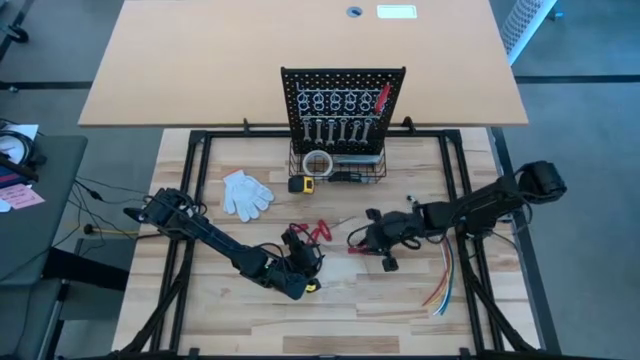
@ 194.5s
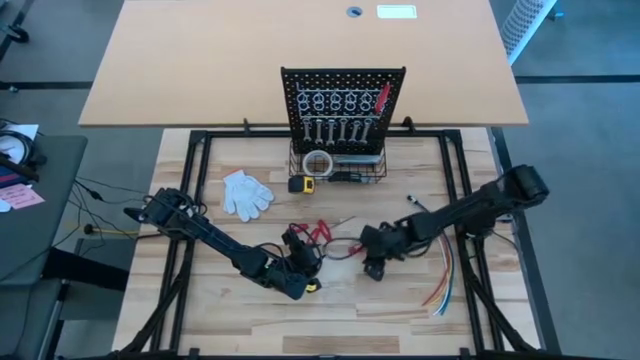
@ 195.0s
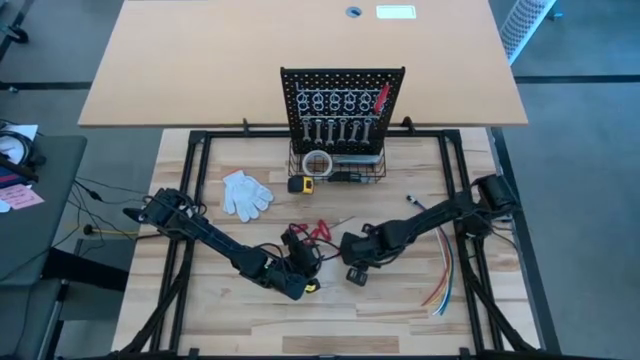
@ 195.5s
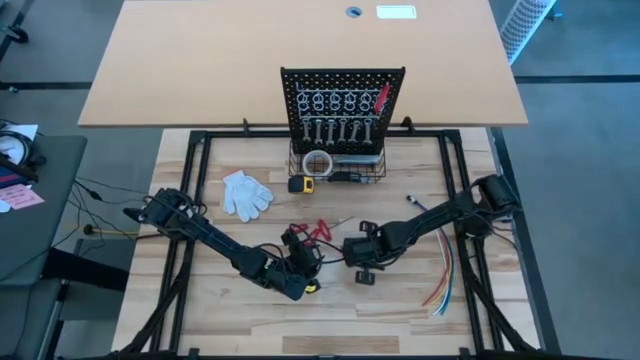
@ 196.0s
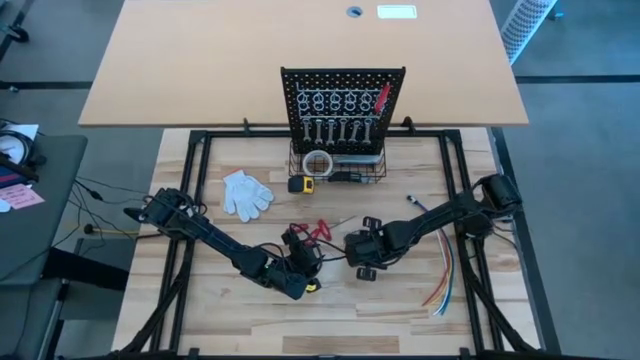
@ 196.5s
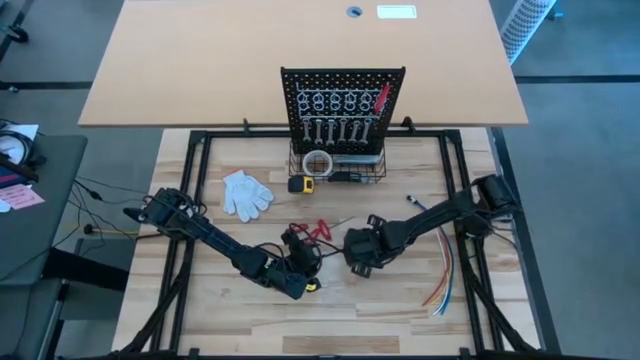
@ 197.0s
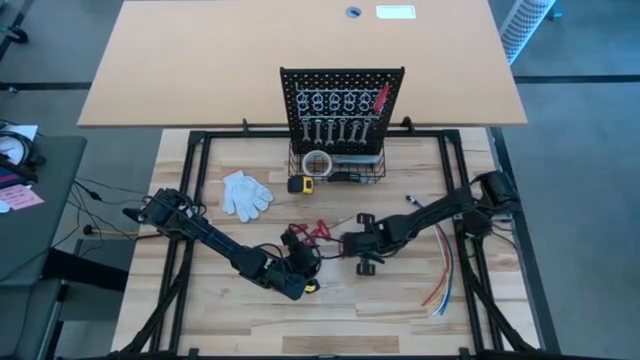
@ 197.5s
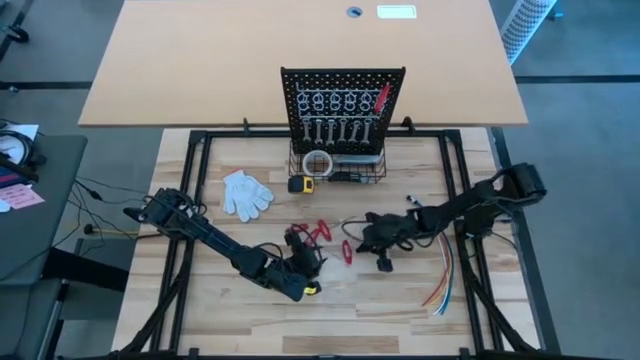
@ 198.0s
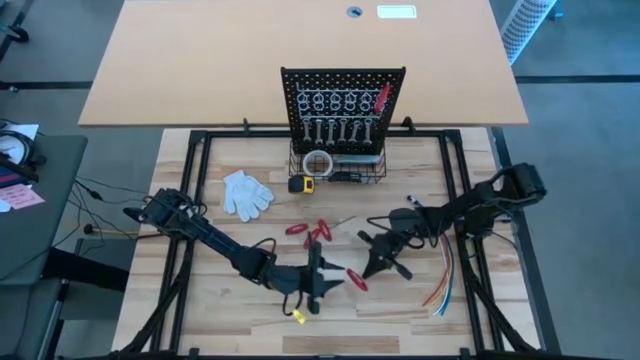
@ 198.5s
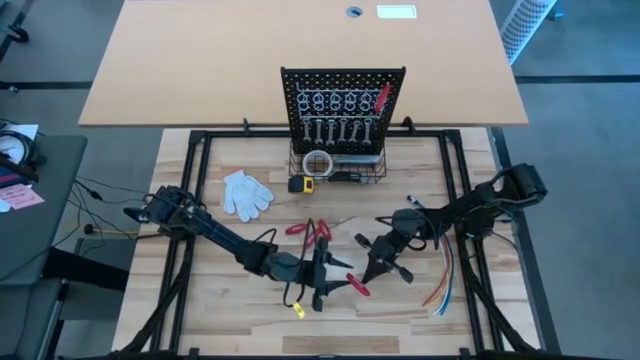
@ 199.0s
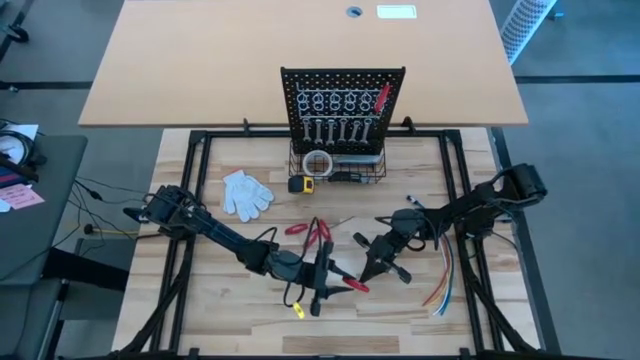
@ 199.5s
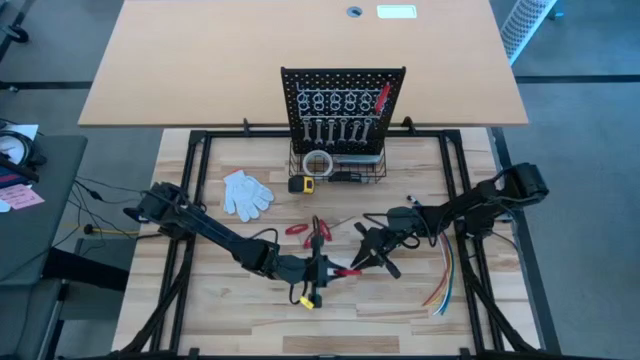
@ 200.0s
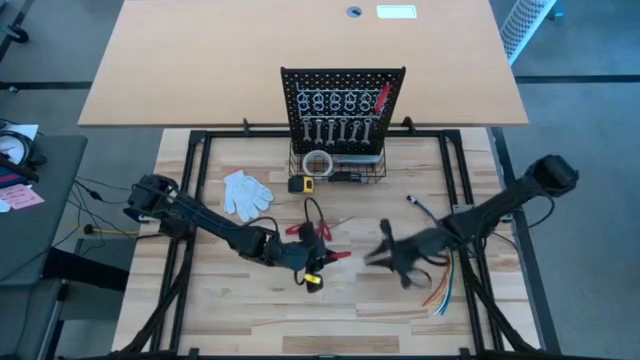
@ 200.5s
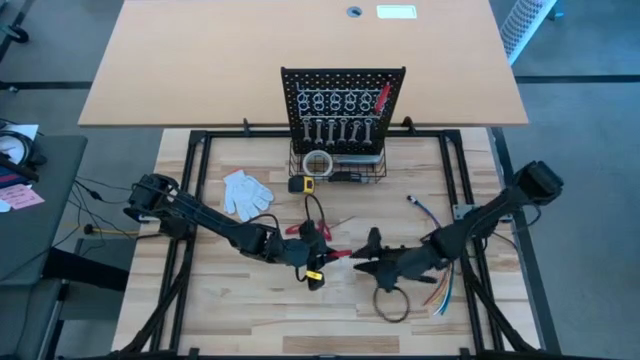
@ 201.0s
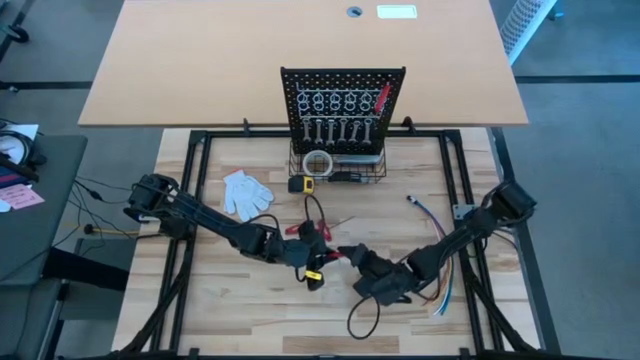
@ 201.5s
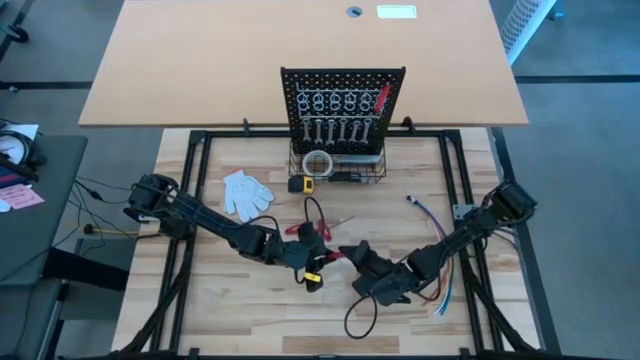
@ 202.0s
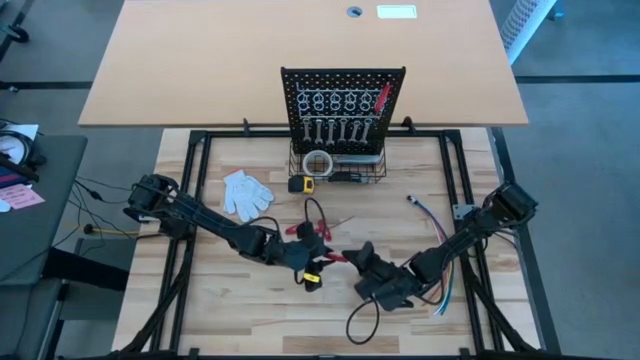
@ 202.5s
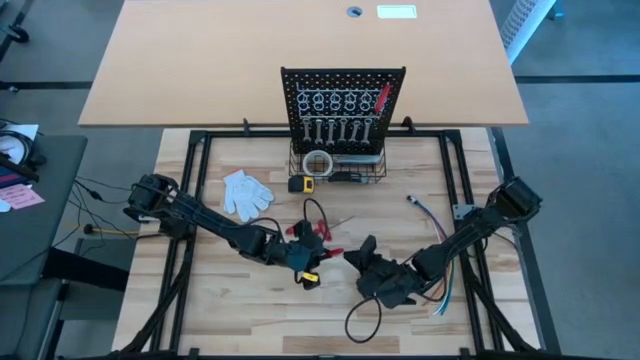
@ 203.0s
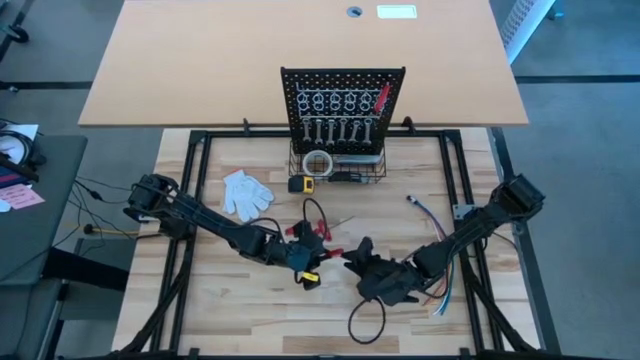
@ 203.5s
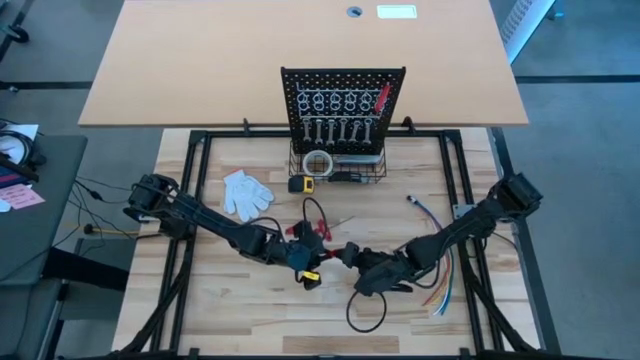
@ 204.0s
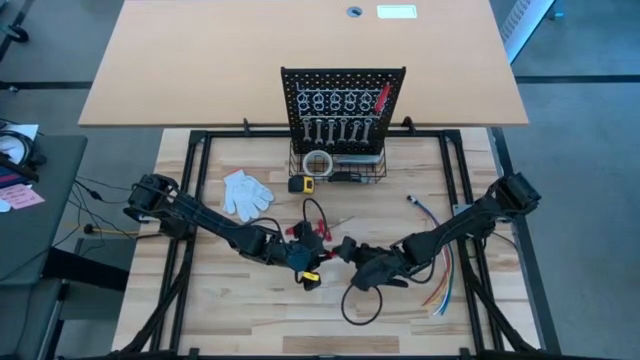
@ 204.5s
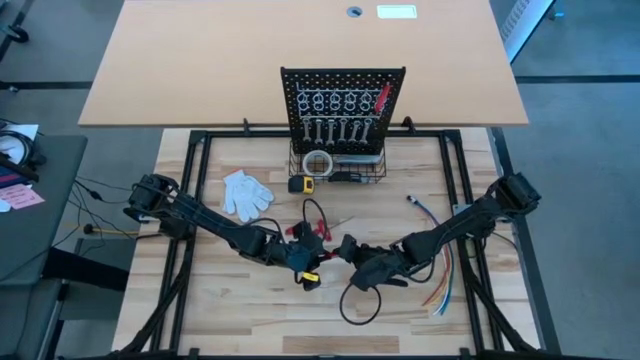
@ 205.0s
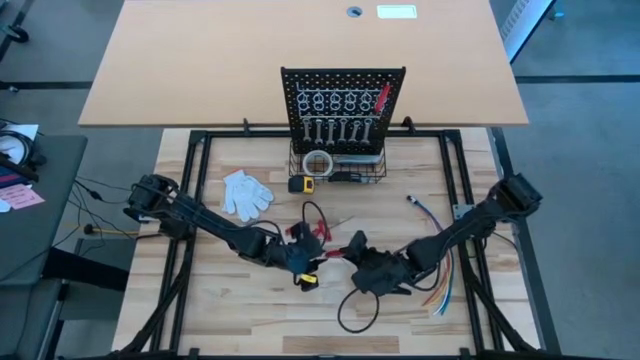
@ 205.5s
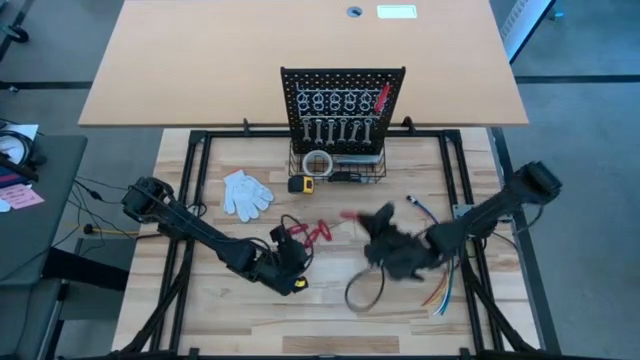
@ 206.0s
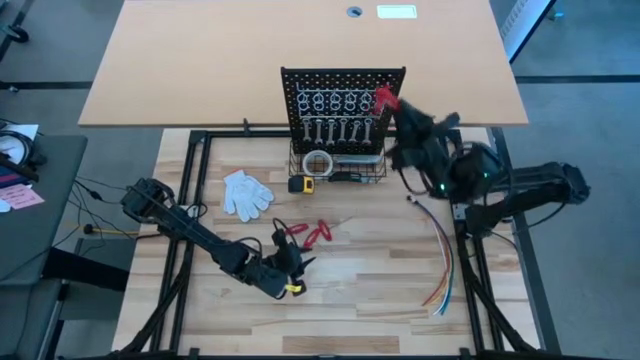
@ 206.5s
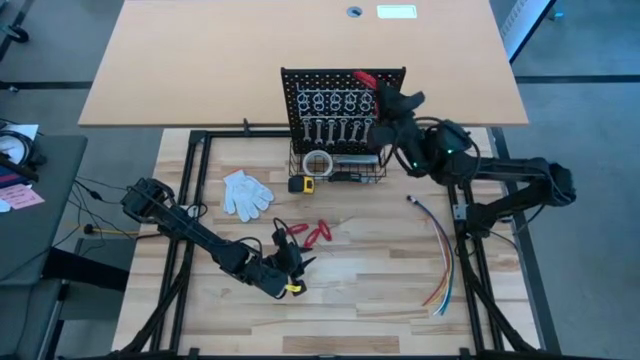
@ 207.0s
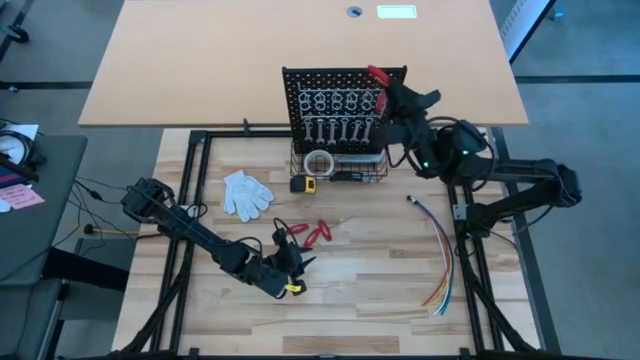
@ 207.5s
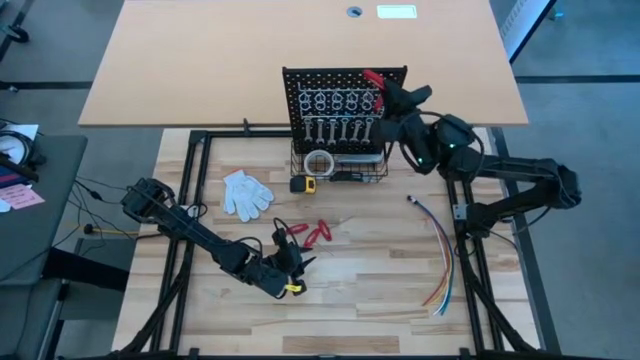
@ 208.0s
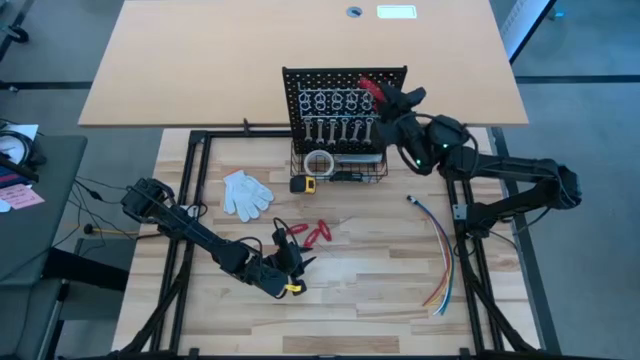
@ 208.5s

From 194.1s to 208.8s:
Task: Hang tools onto peg board
Hang the red allen wrench on the peg board

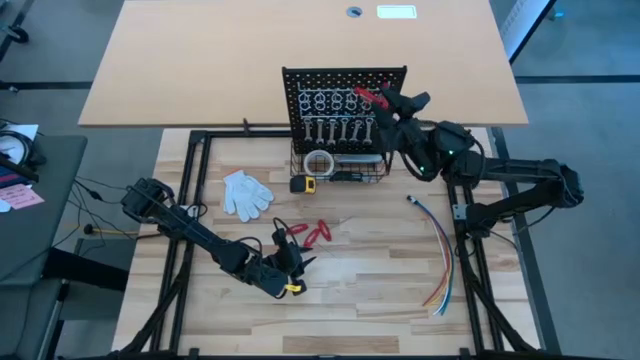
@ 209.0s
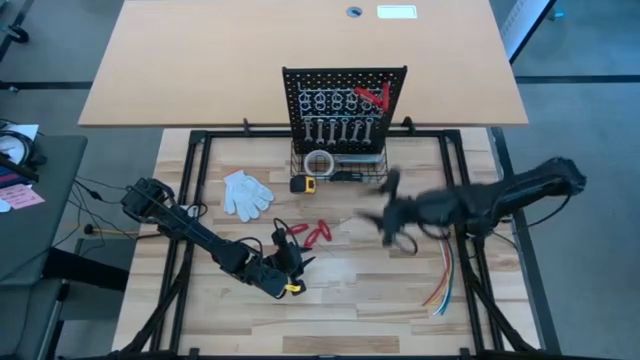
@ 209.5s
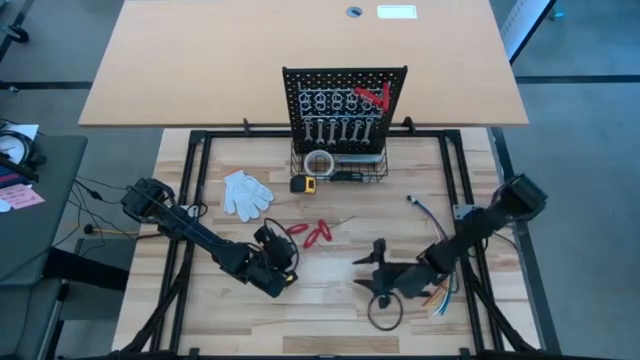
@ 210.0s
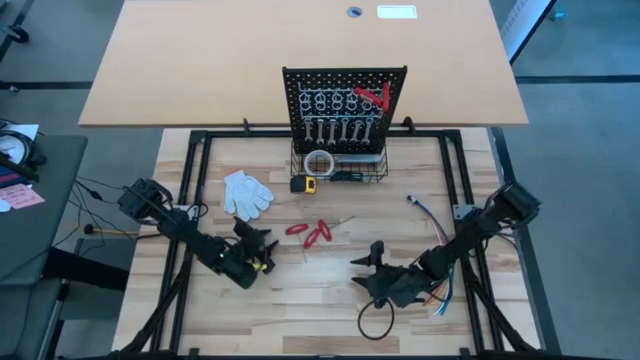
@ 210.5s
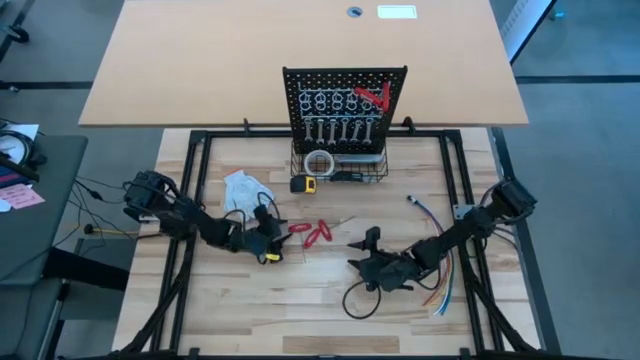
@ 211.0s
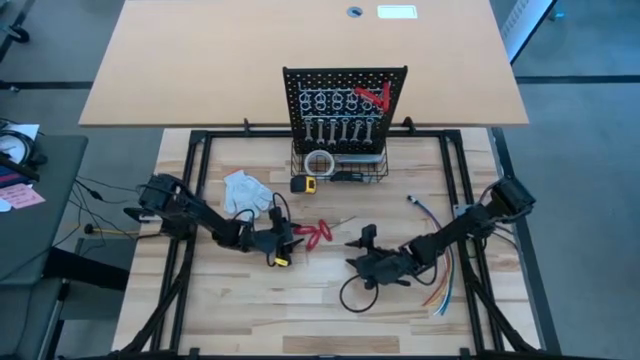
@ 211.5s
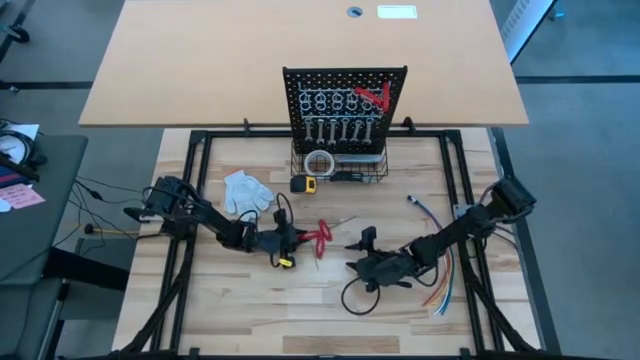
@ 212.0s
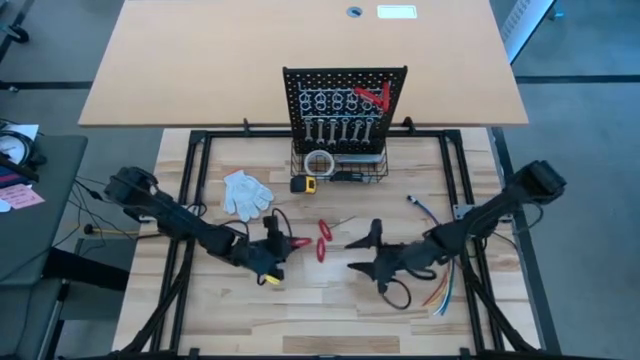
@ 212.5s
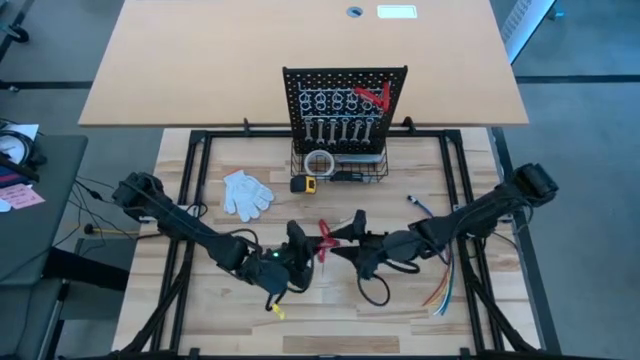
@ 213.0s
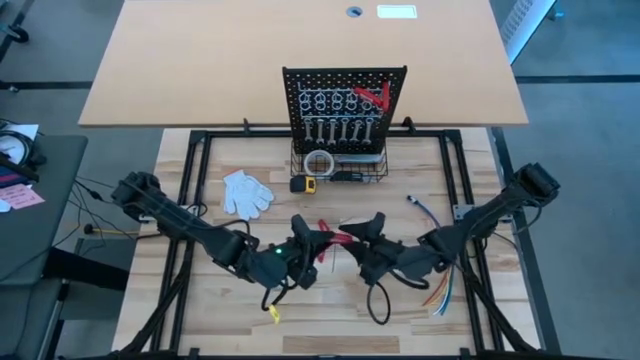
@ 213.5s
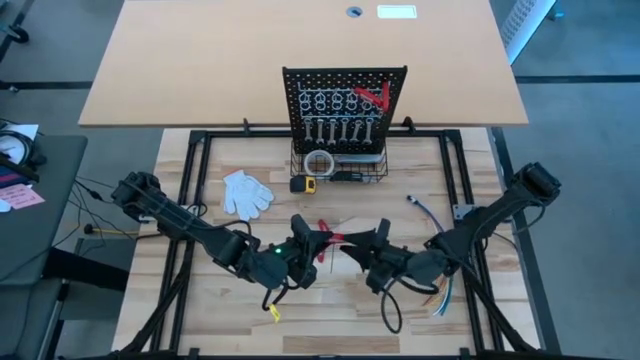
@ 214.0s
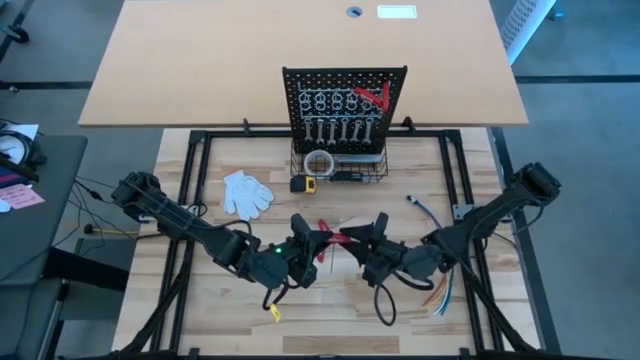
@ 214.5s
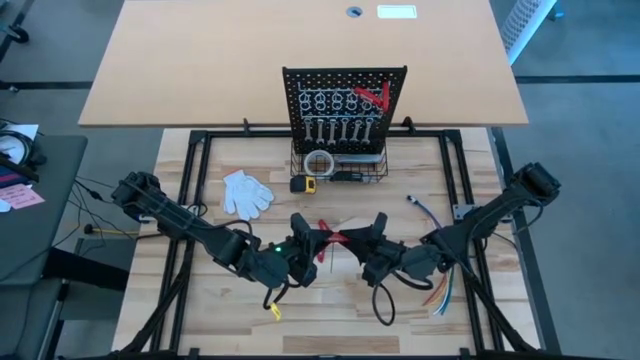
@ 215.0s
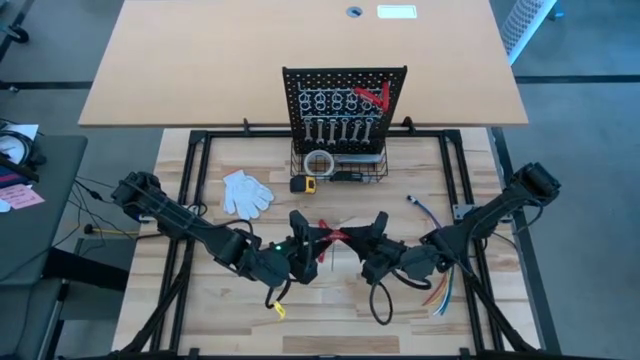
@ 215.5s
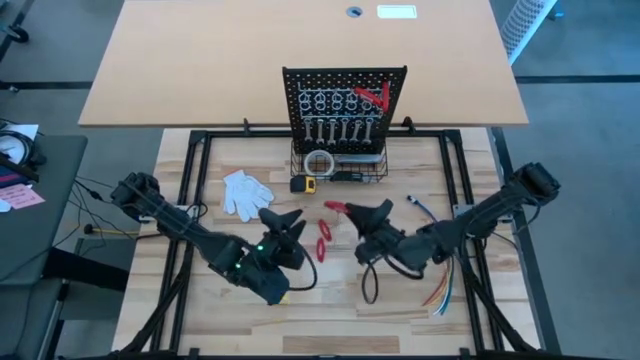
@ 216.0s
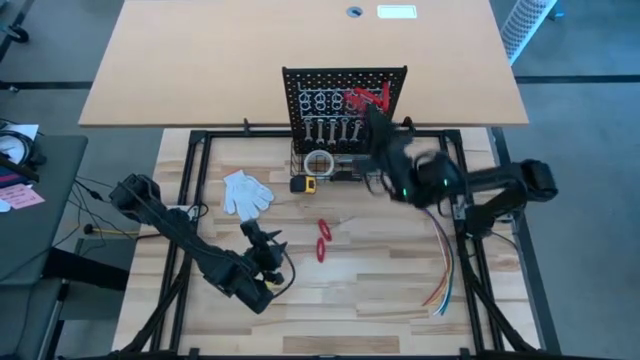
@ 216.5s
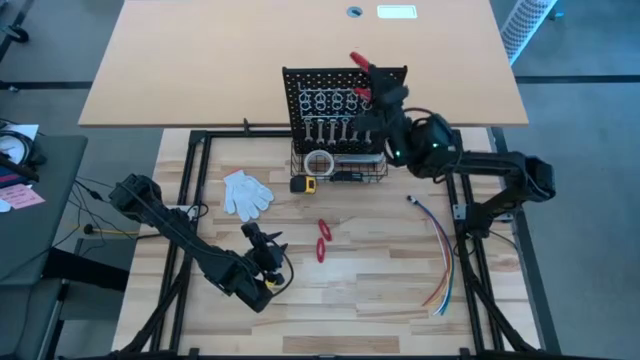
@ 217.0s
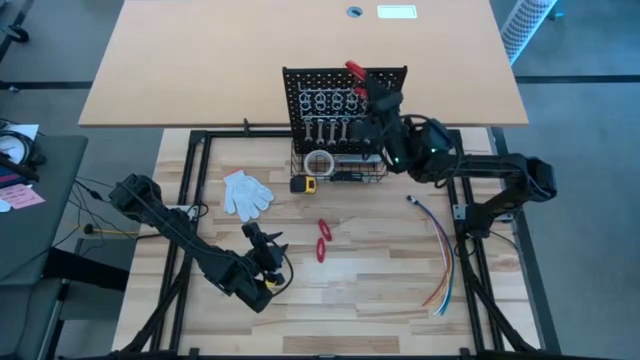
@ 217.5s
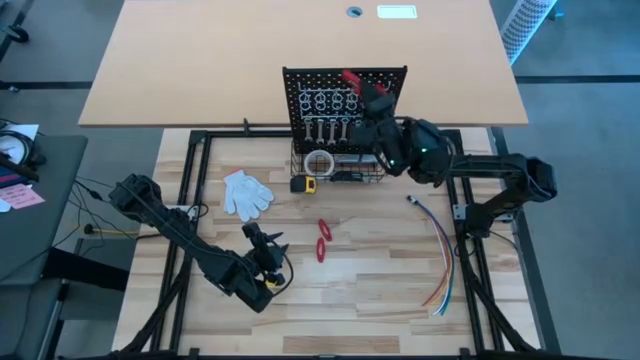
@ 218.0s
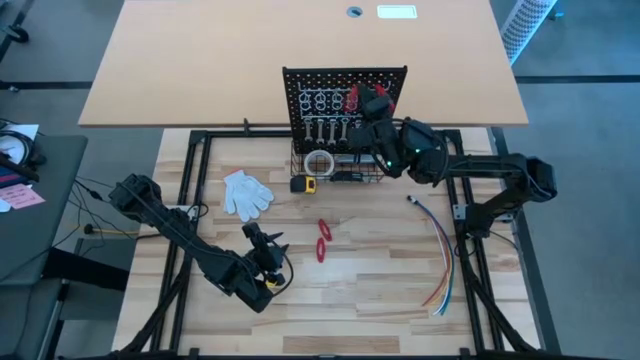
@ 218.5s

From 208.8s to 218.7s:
Hang the red allen wrench on the peg board
